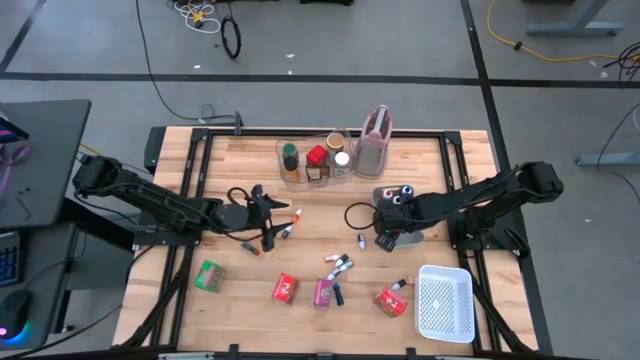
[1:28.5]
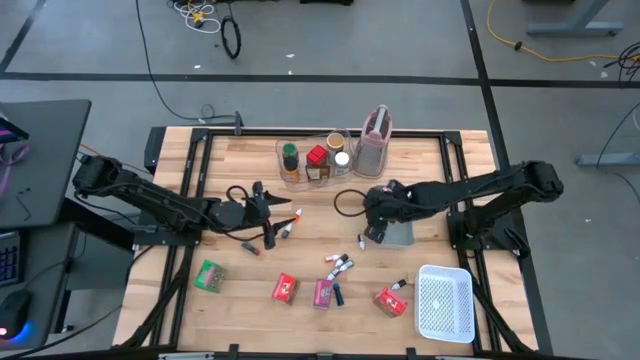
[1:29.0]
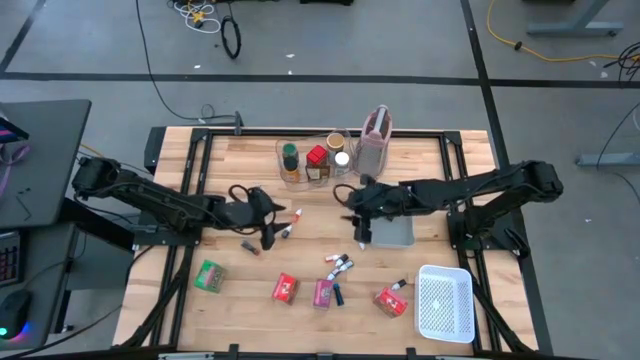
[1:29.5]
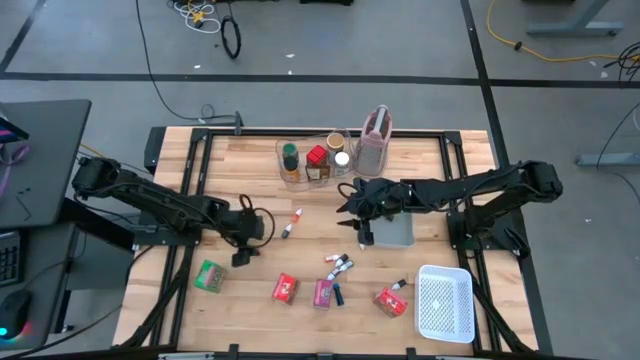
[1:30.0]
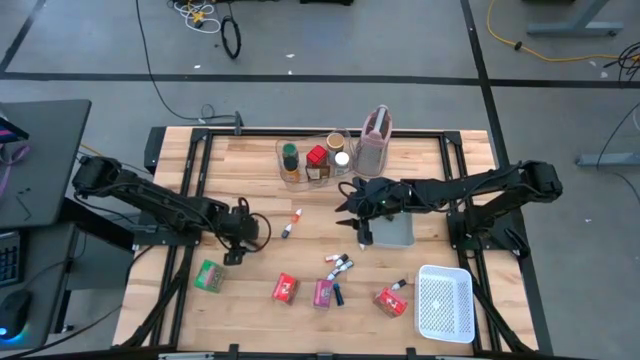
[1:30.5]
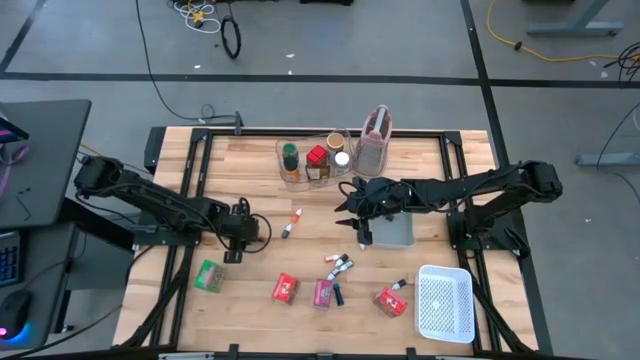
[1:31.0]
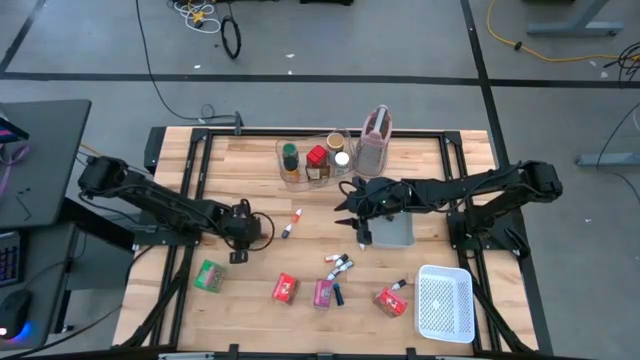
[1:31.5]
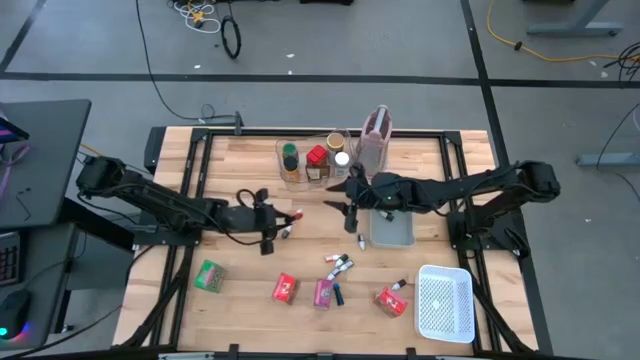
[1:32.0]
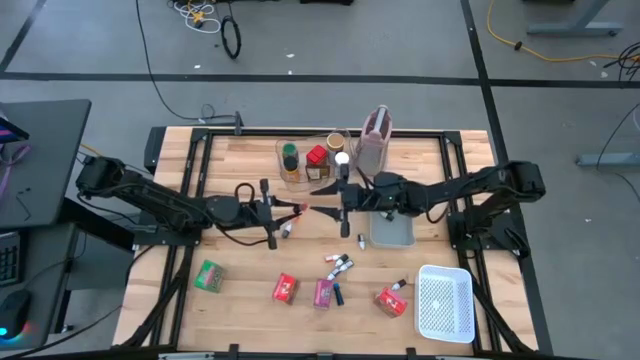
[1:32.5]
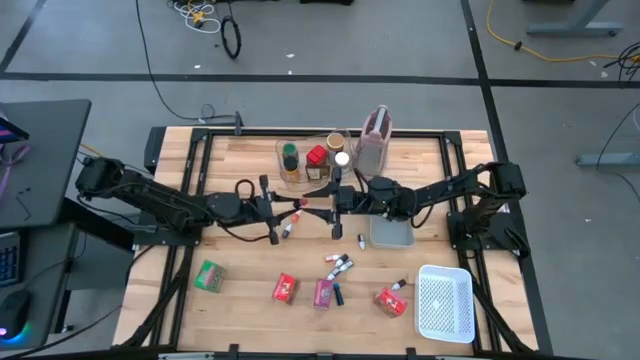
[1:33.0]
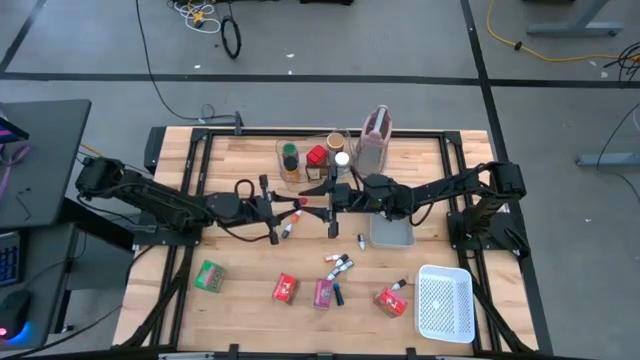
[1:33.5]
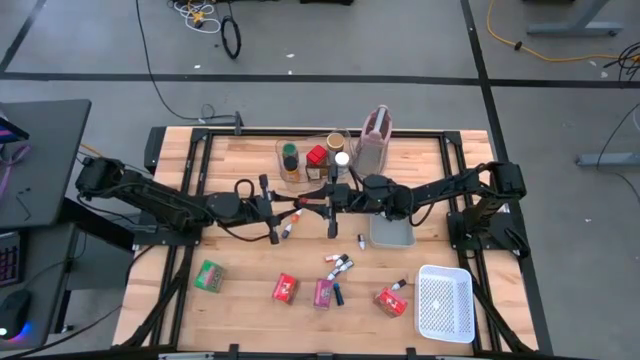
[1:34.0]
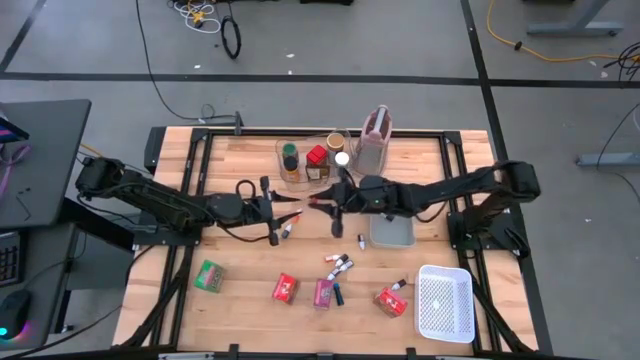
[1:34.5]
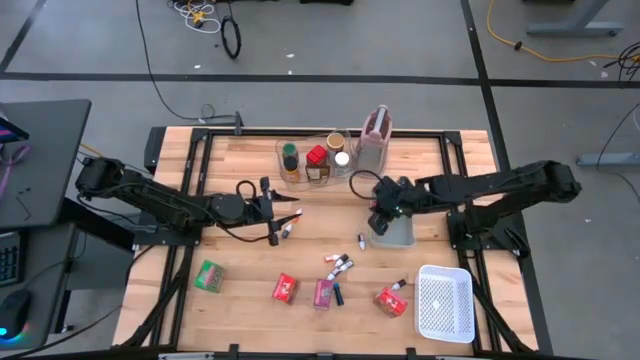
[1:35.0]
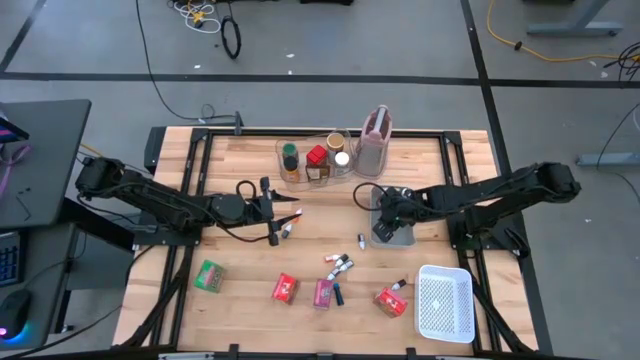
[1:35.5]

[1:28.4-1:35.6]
Task: Pick & Place Kitchen Items
Put the medium red food coloring bottle into the gray bin

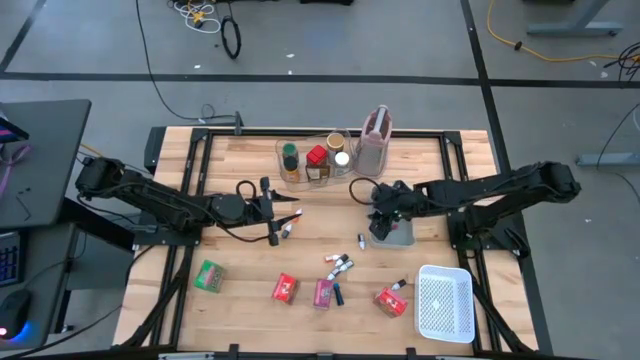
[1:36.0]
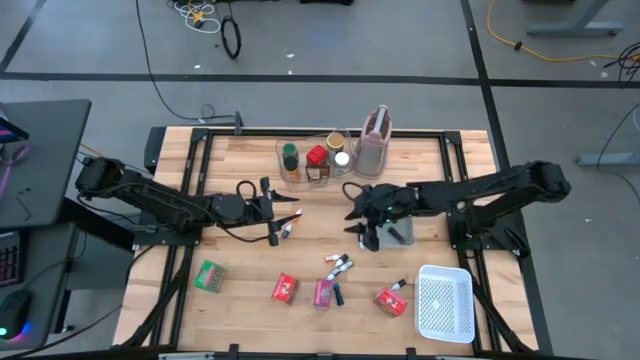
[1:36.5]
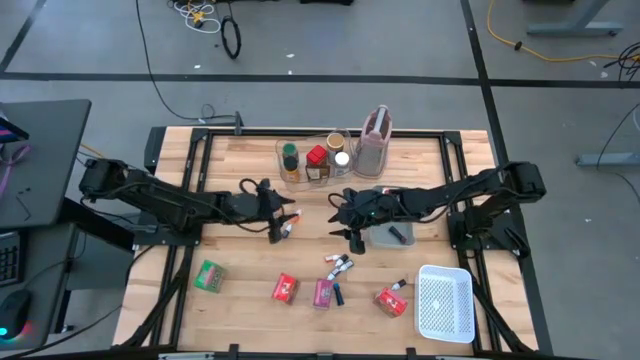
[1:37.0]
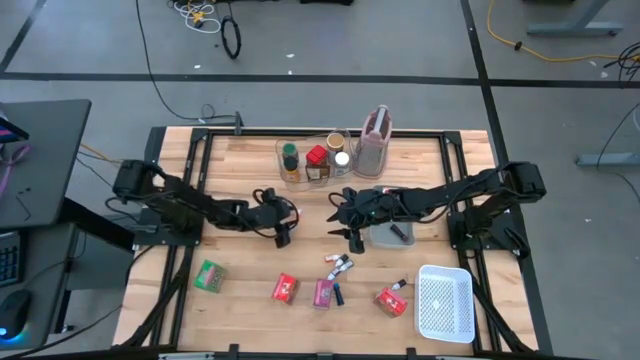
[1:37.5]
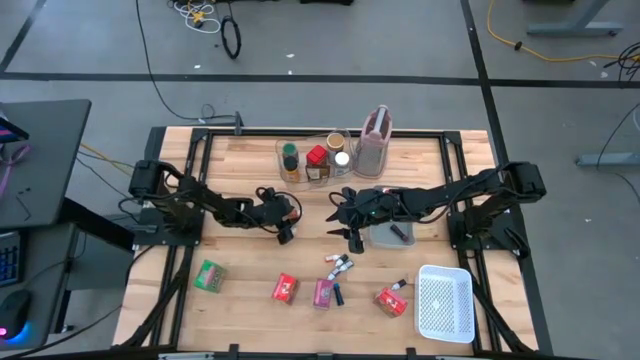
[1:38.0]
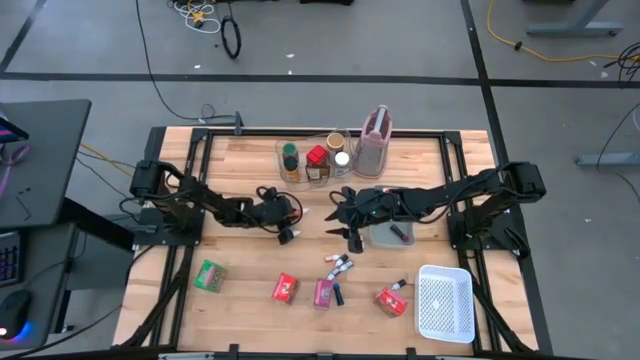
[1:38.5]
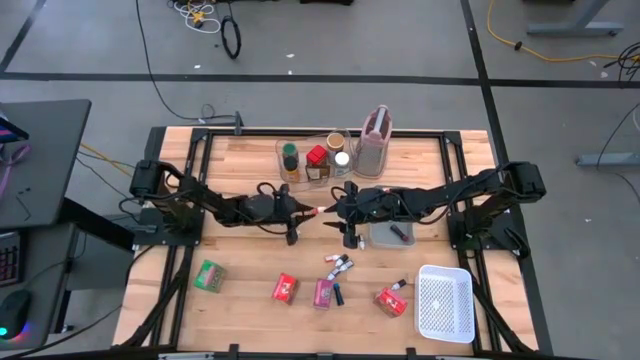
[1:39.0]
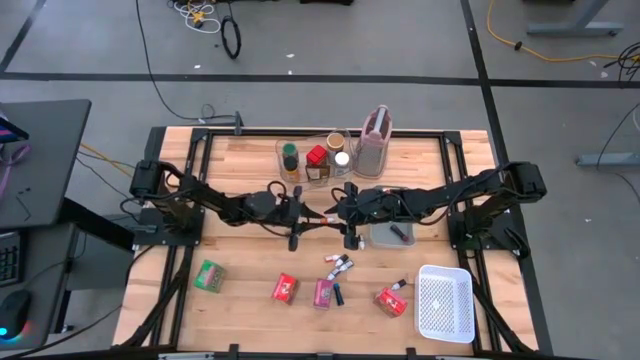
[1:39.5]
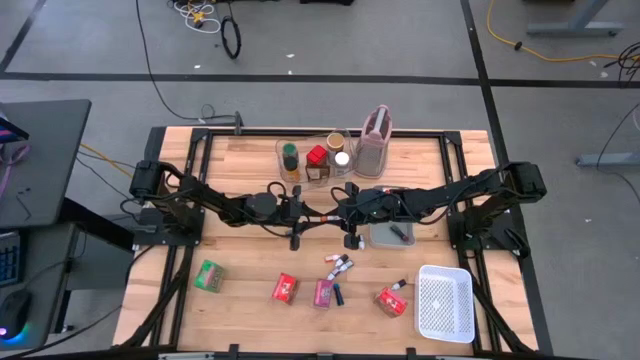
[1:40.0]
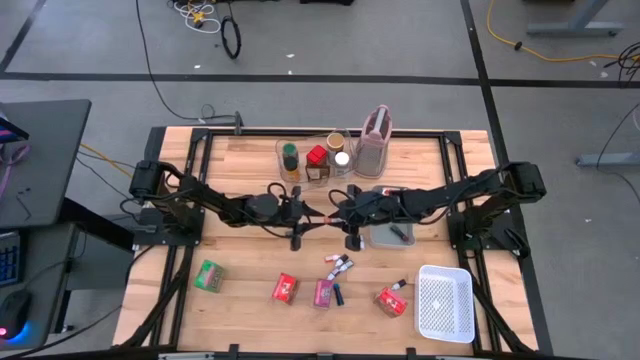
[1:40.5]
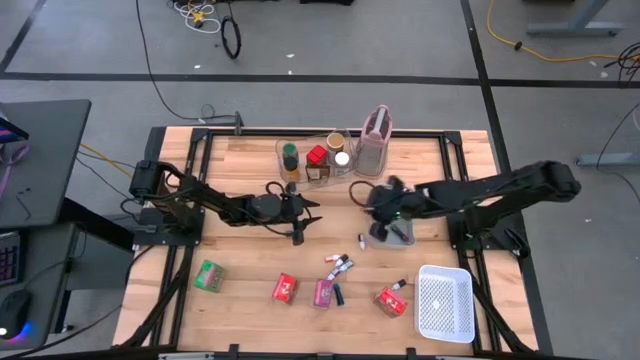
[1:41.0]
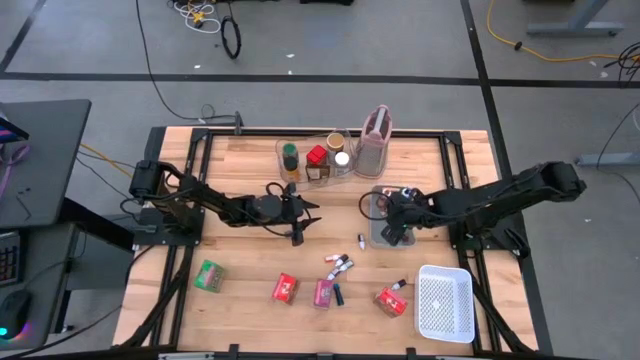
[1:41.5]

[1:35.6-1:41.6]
Put the small orange food coloring bottle into the gray bin

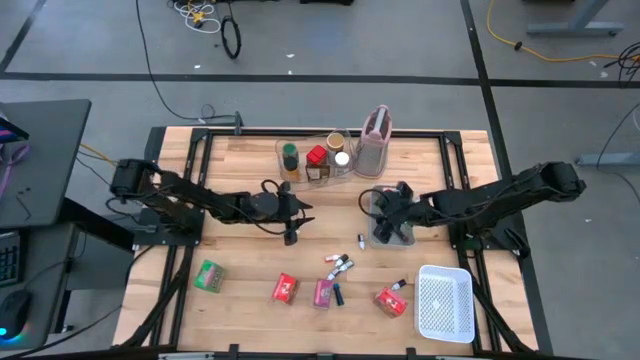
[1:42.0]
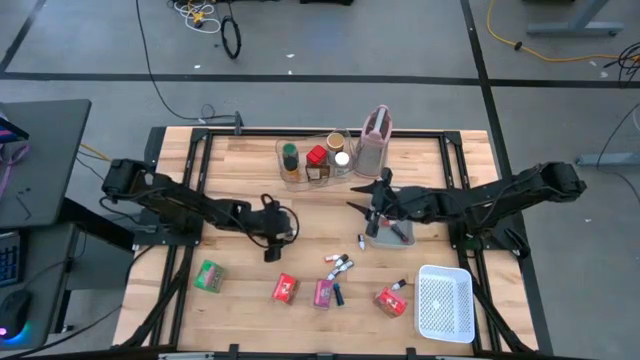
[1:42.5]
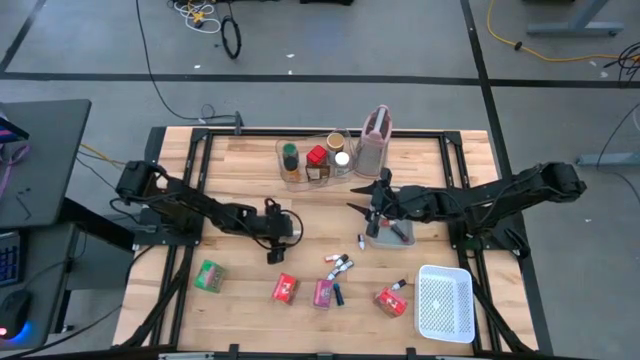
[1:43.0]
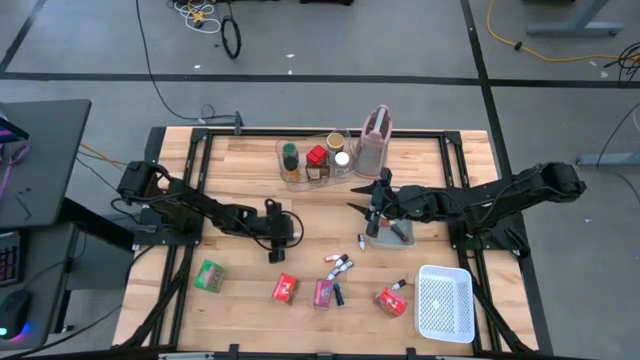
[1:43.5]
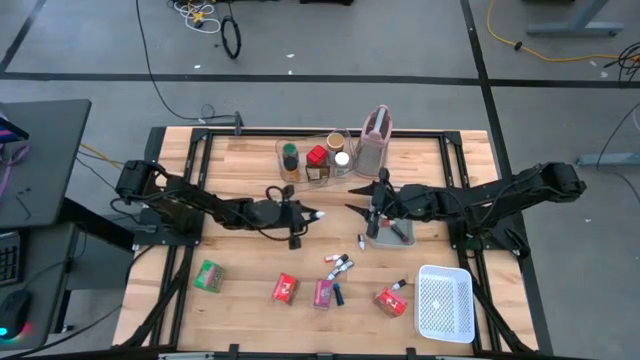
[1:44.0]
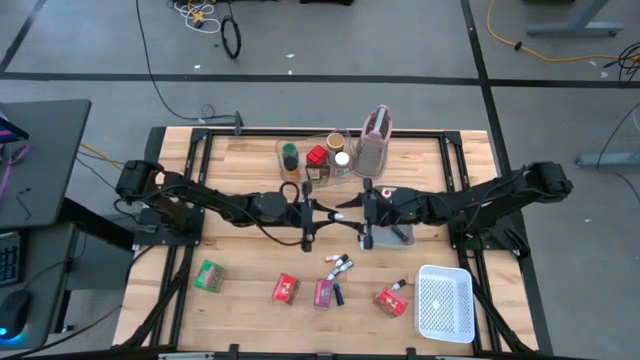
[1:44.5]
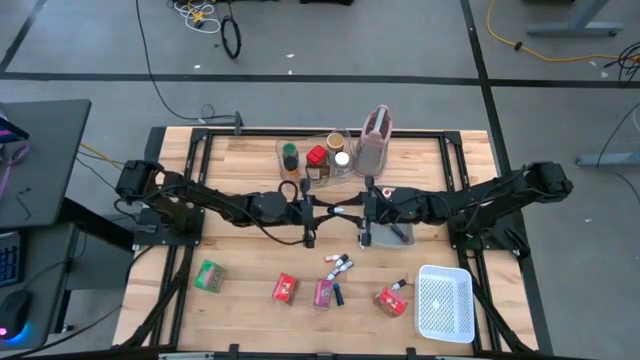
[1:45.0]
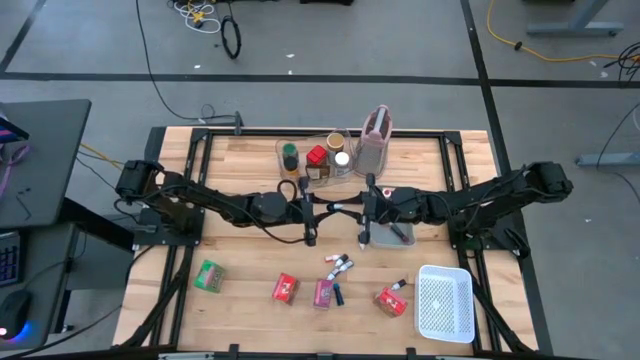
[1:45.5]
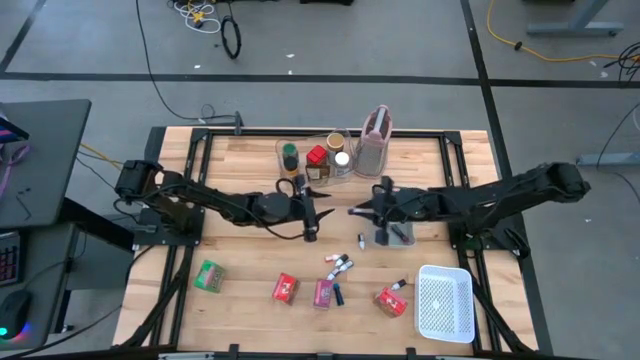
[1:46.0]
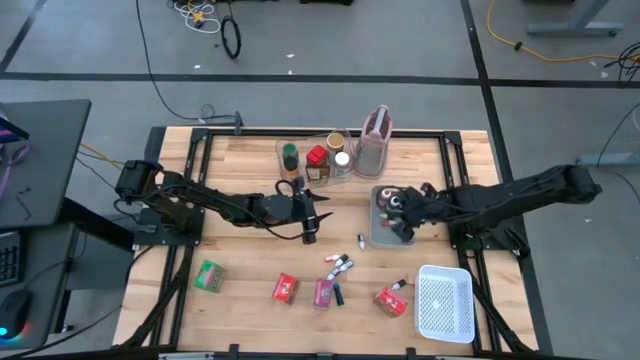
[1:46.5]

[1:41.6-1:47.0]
Put the small black food coloring bottle into the gray bin
